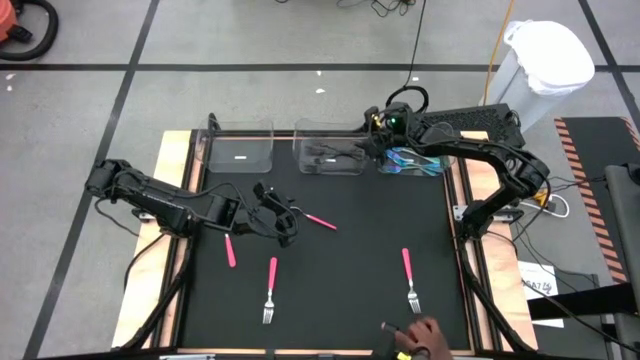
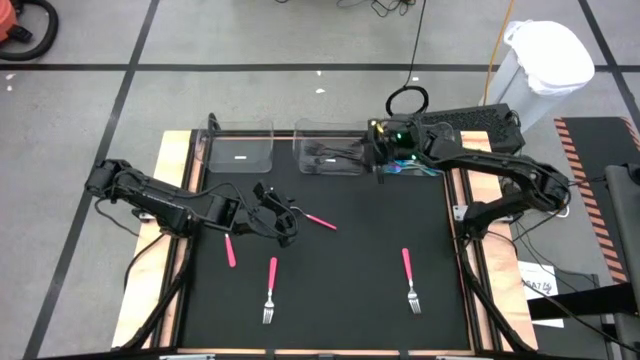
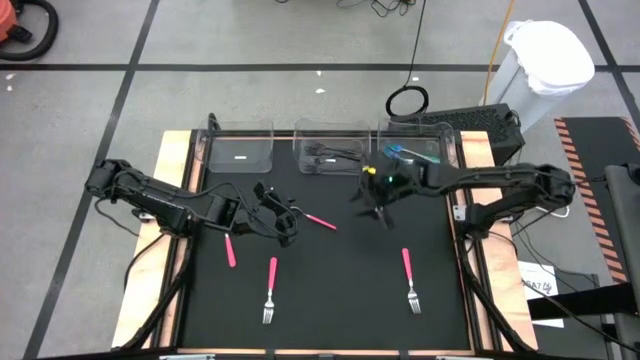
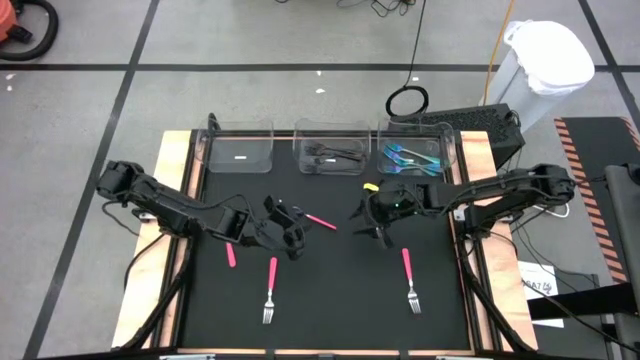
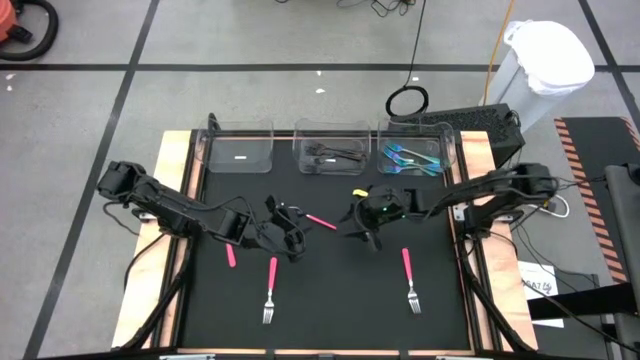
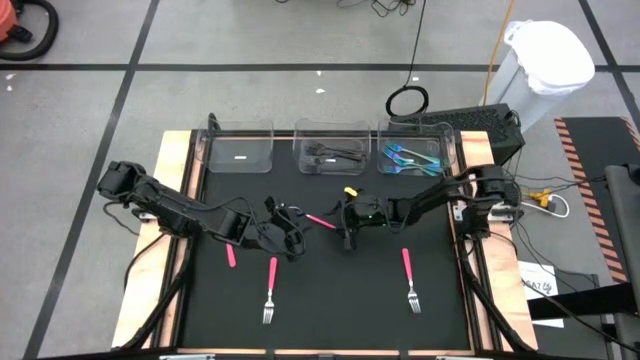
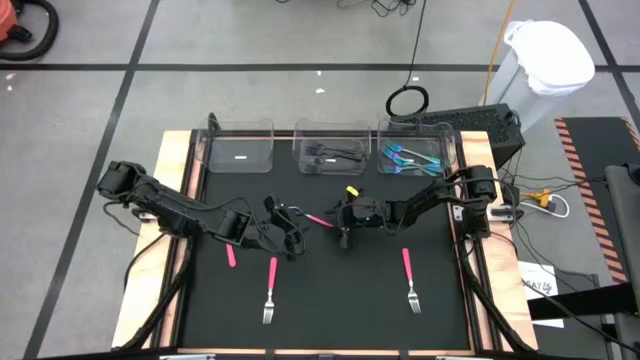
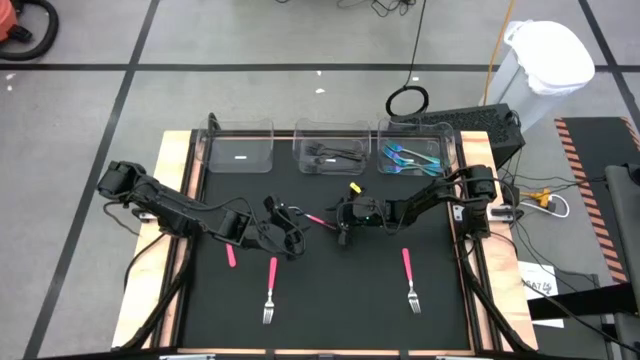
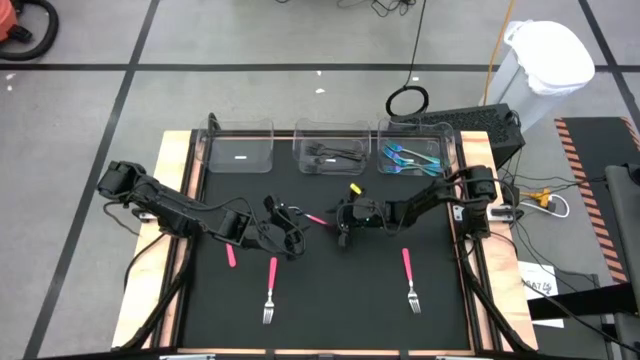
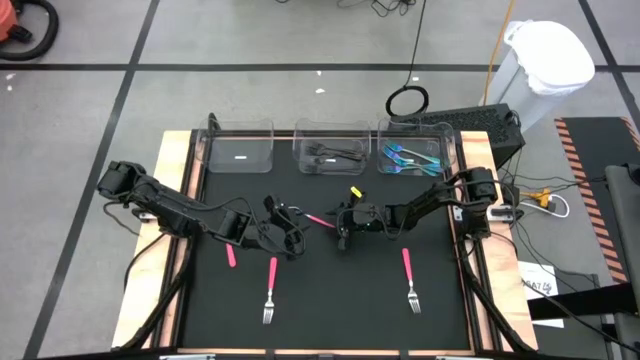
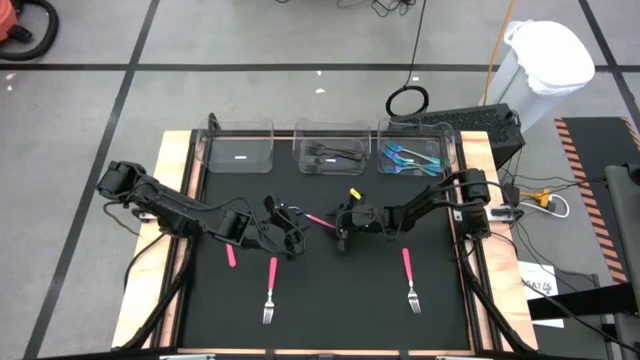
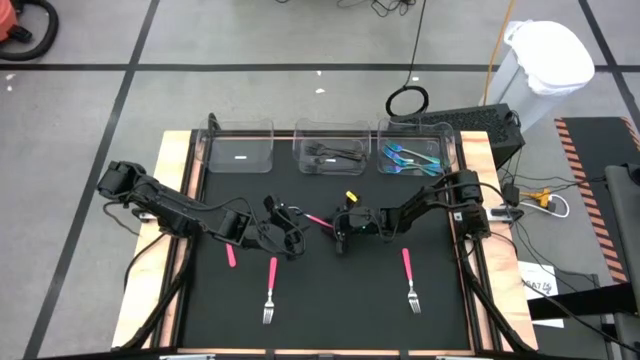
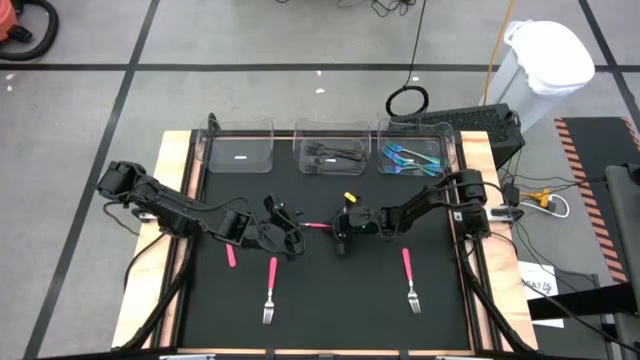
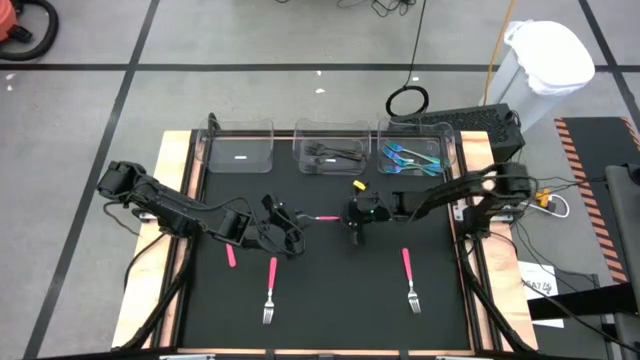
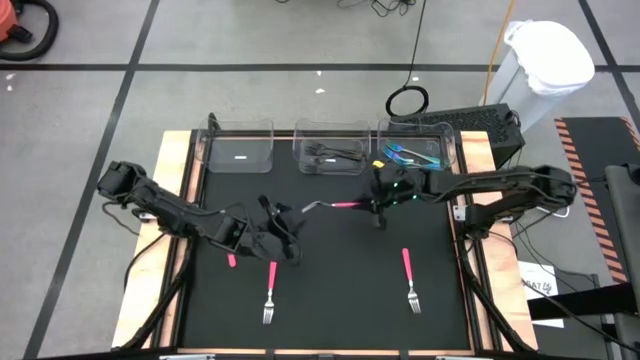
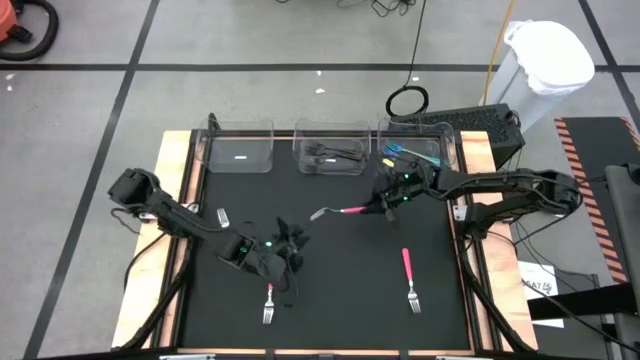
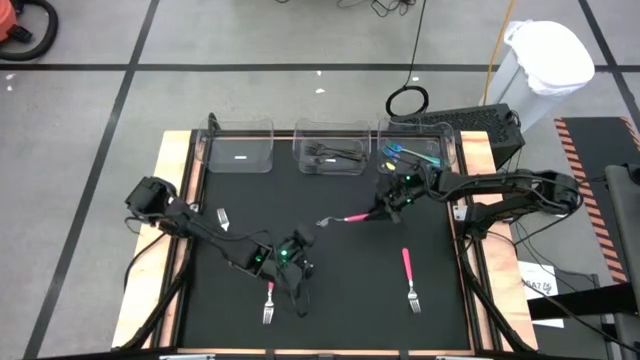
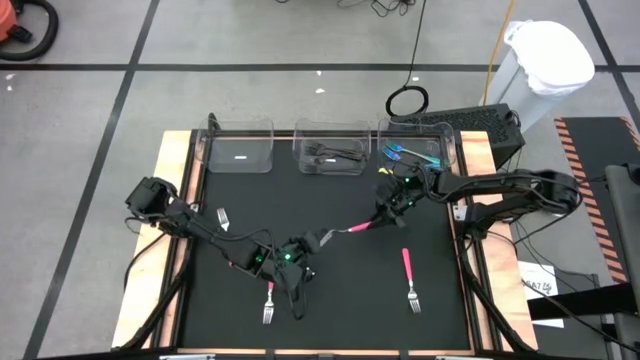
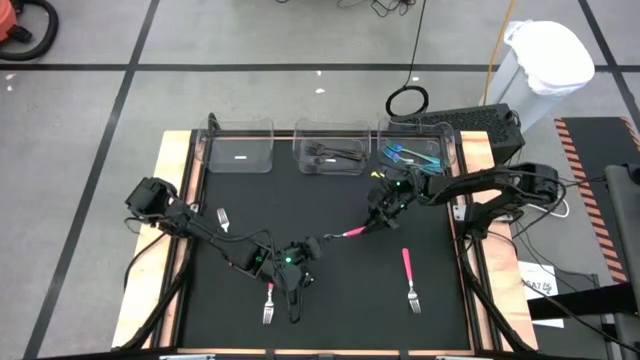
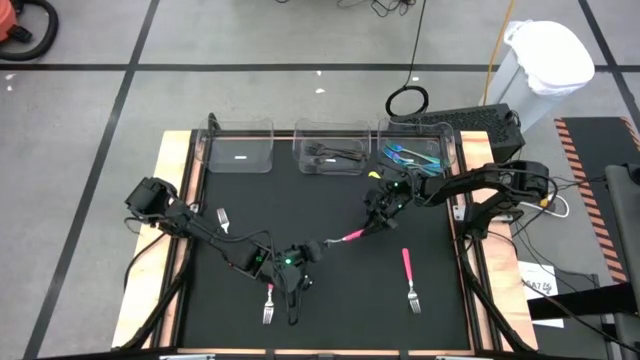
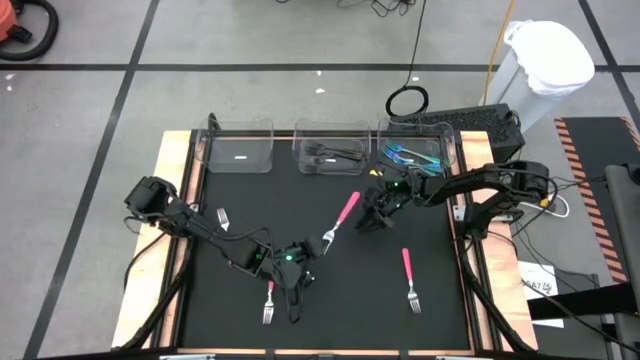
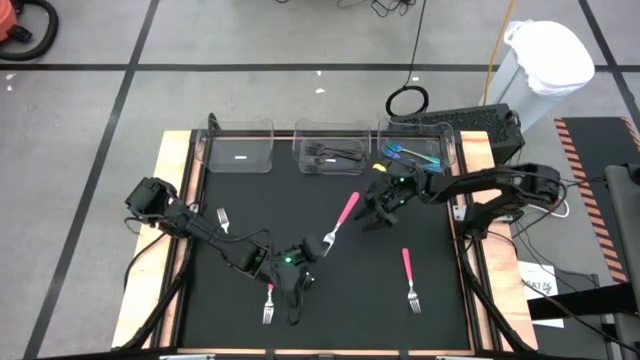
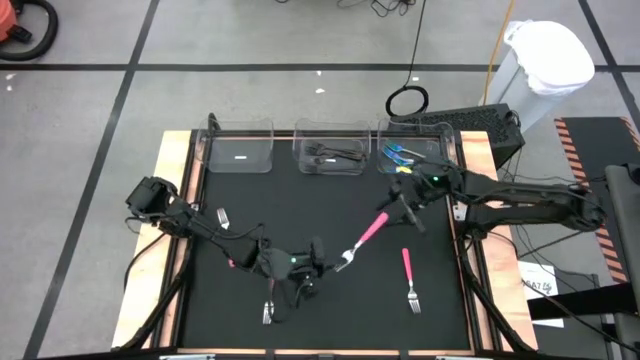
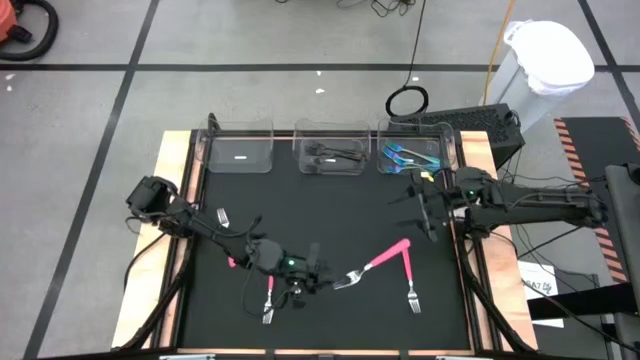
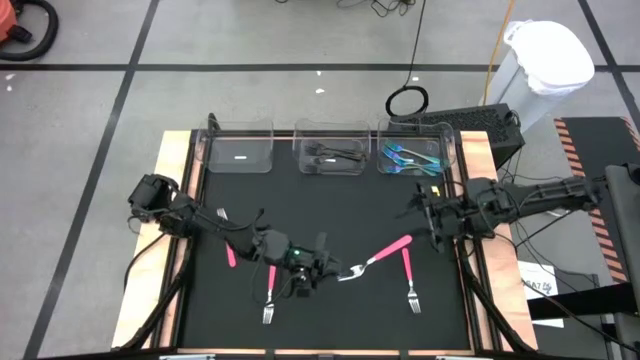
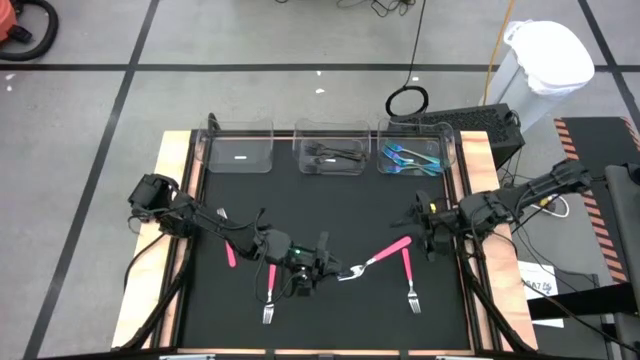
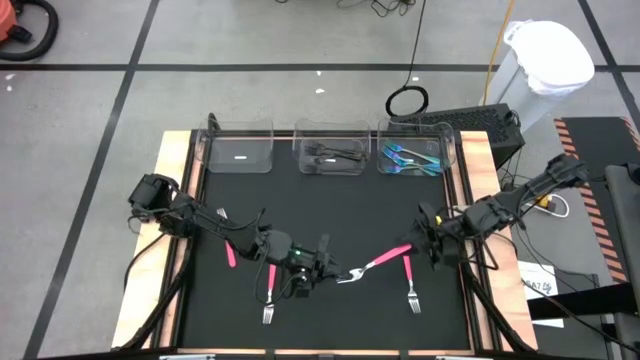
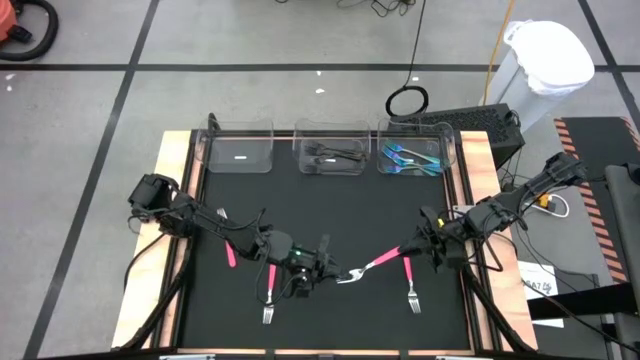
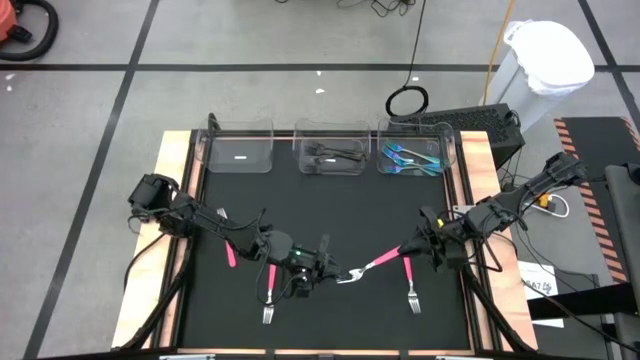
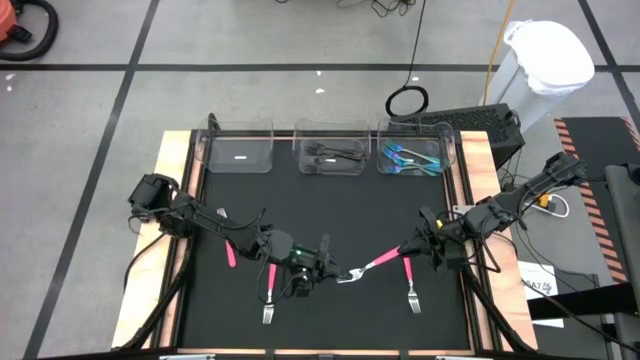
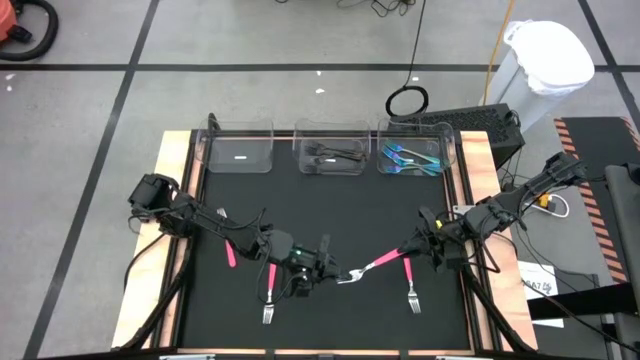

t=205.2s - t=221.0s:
Task: Sort silverware by color (type)
Put the pink fork into the left transparent bin

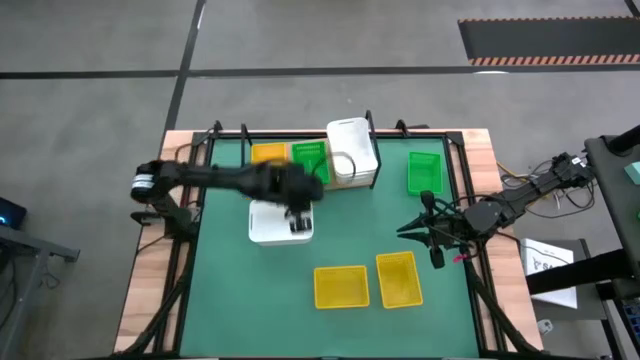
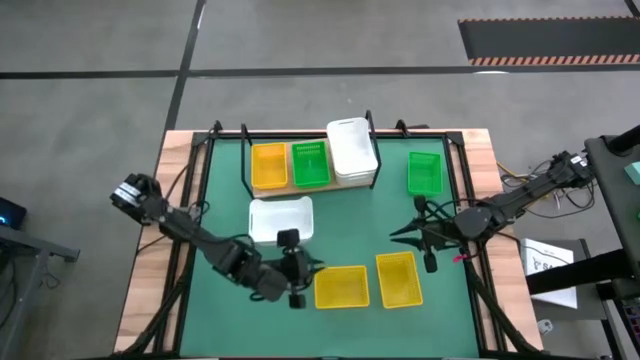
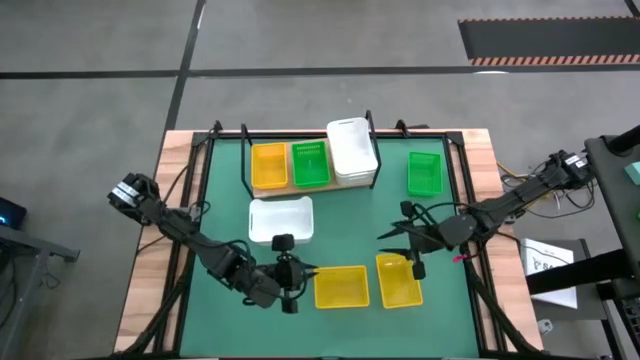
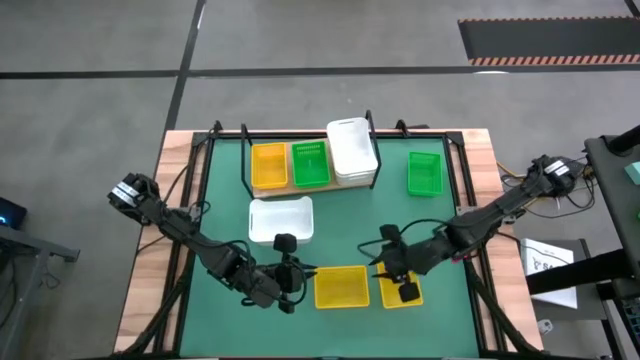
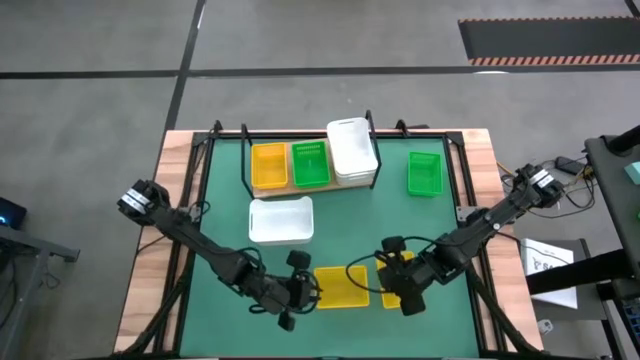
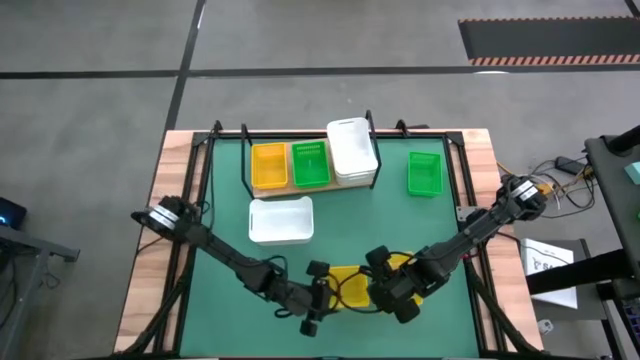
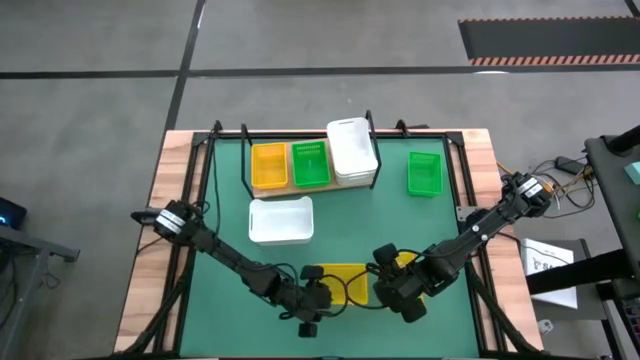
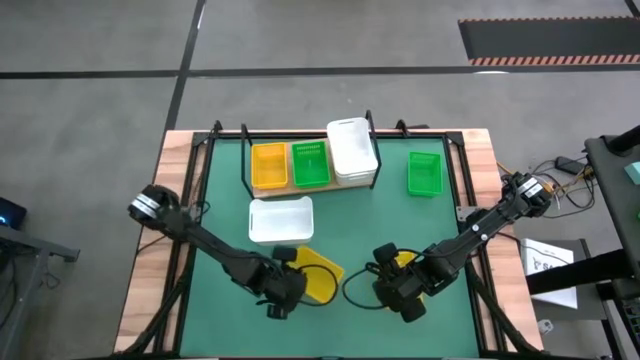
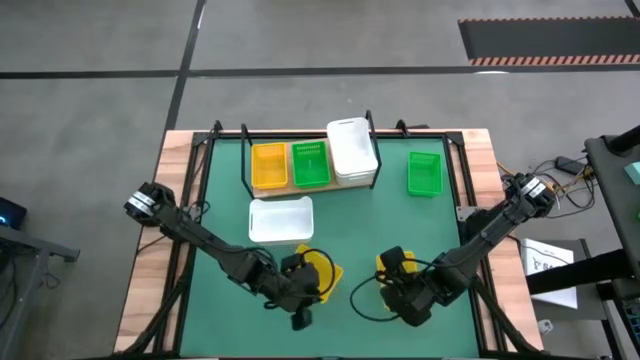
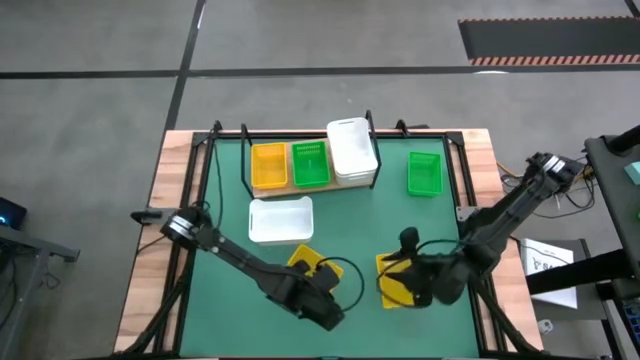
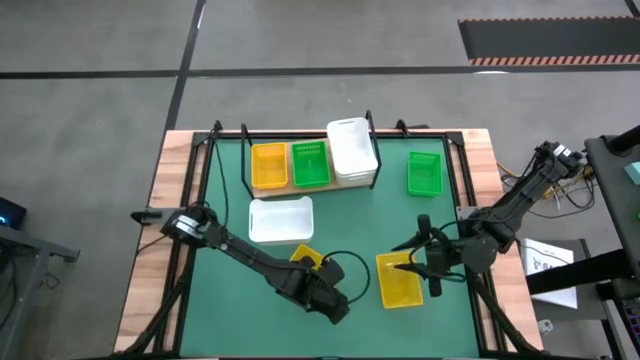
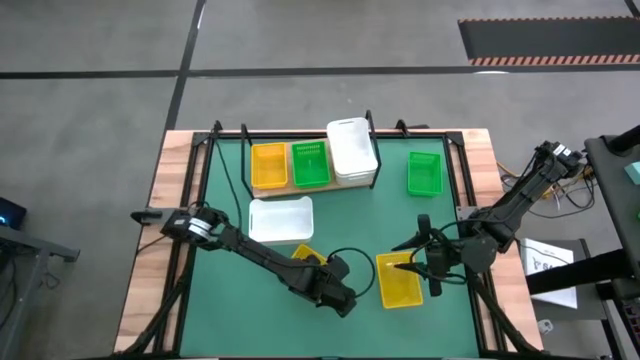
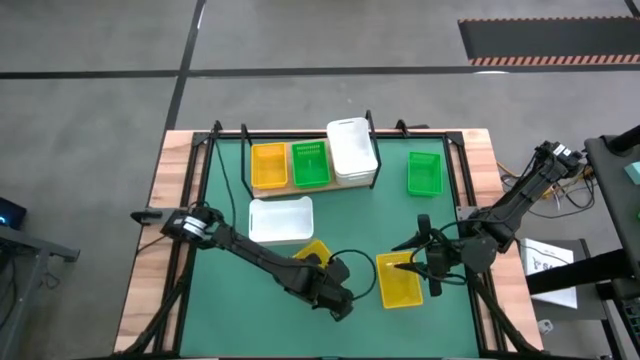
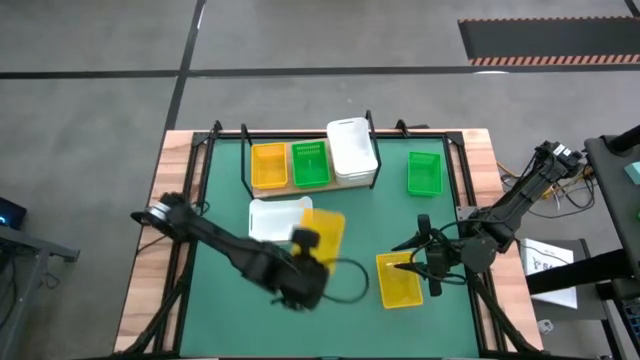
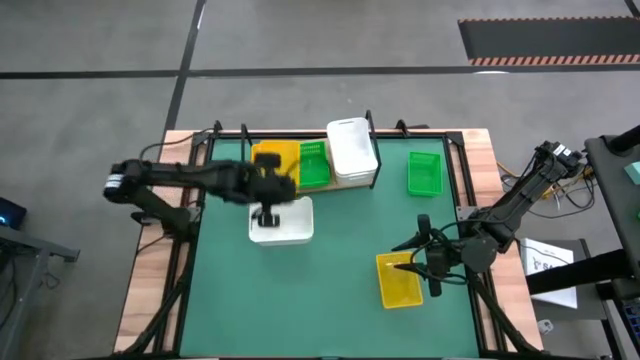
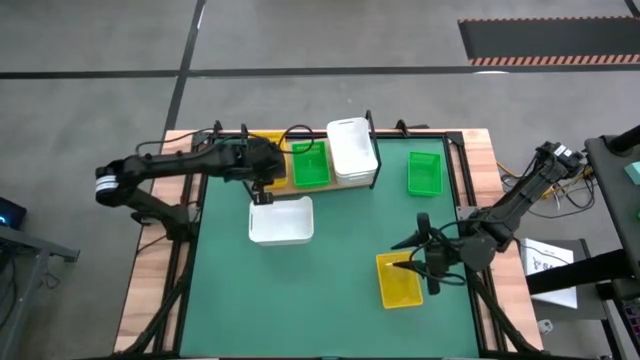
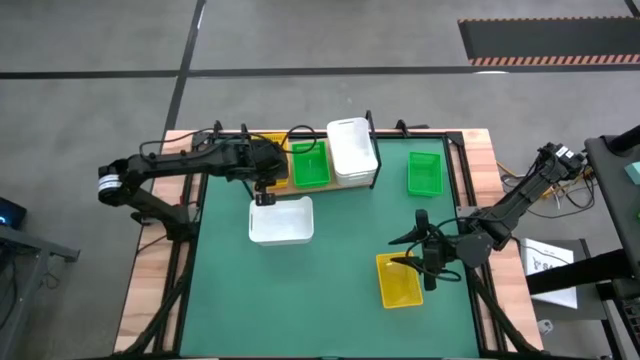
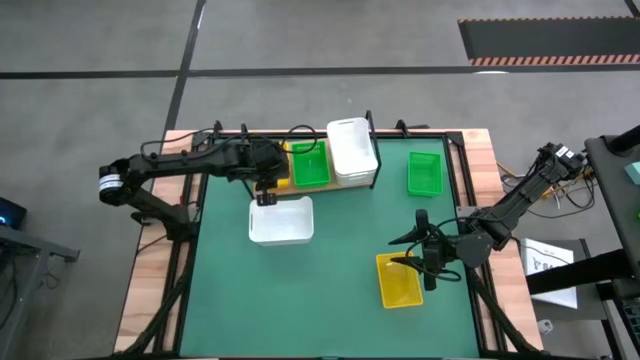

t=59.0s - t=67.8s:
Task: Stack baskets on shelf by color
Stack the left yellow bin on the yellow bin on the shelf
